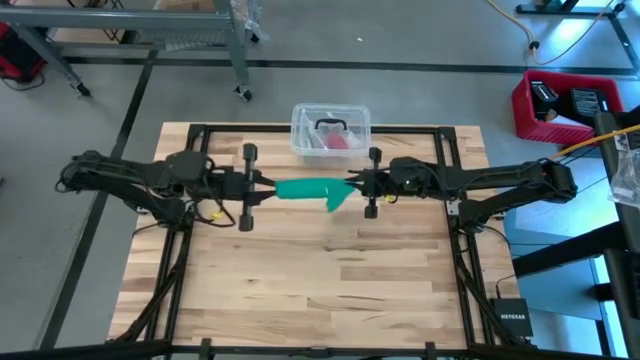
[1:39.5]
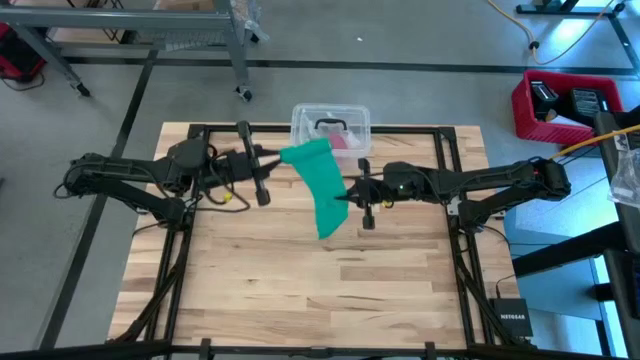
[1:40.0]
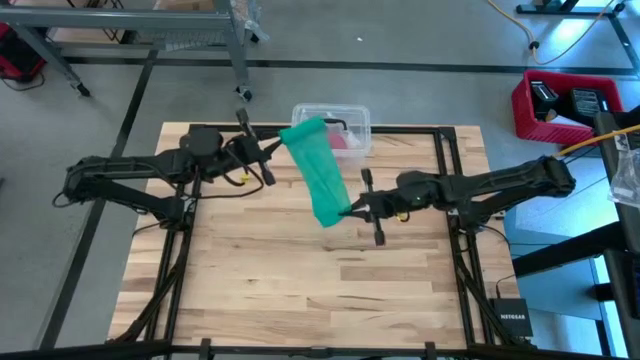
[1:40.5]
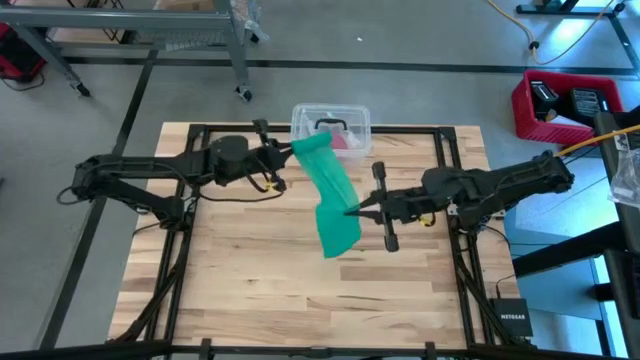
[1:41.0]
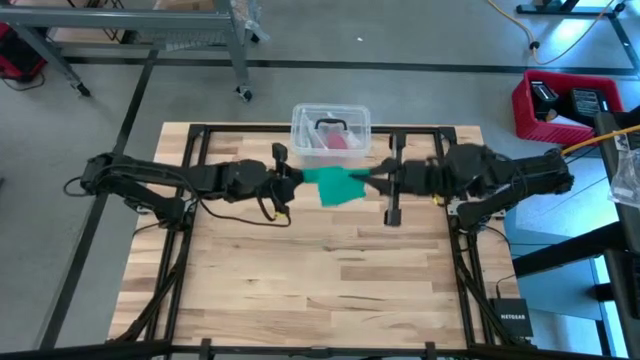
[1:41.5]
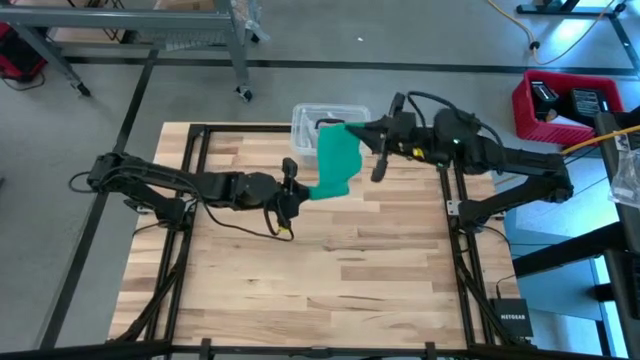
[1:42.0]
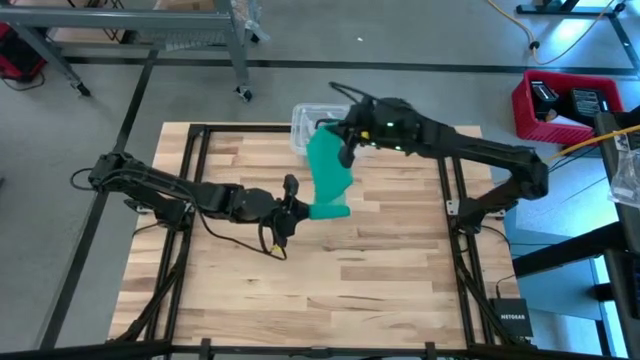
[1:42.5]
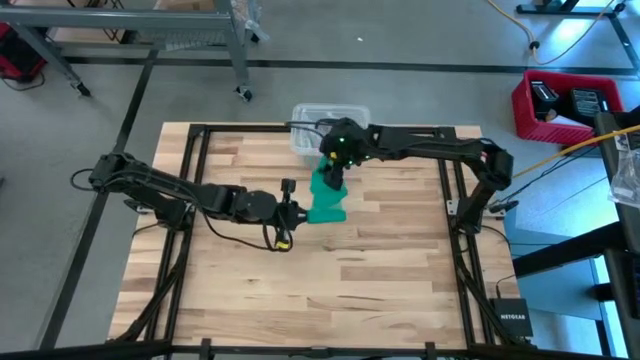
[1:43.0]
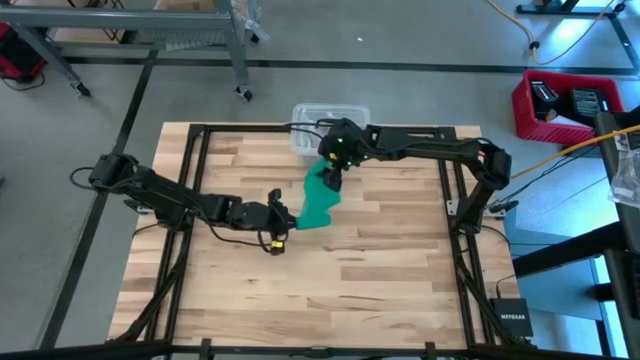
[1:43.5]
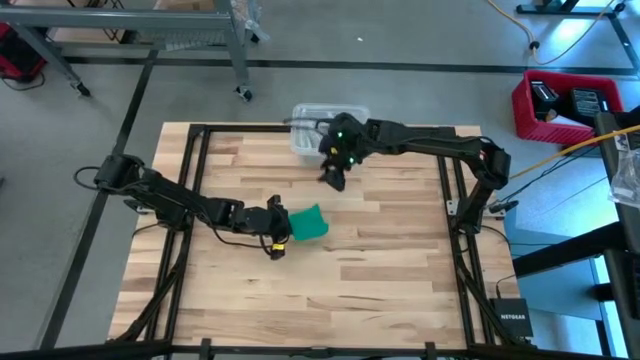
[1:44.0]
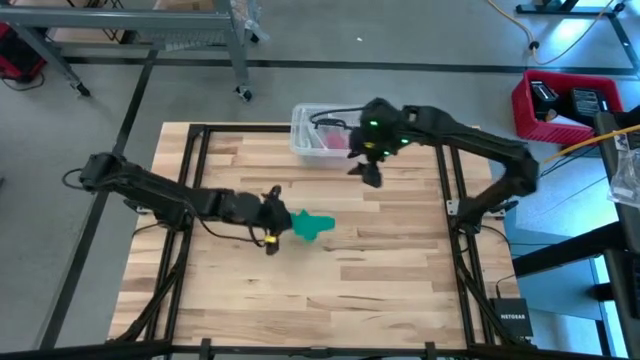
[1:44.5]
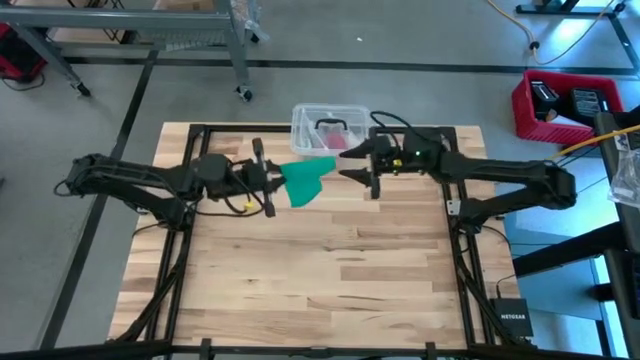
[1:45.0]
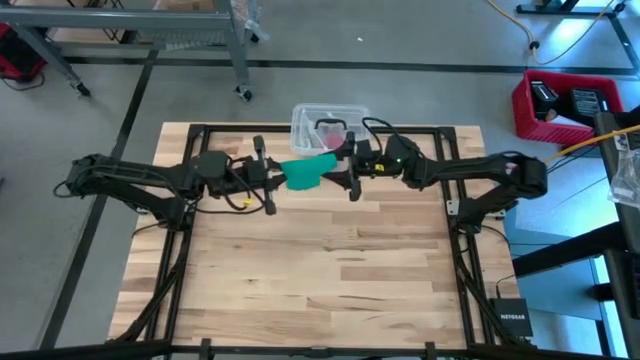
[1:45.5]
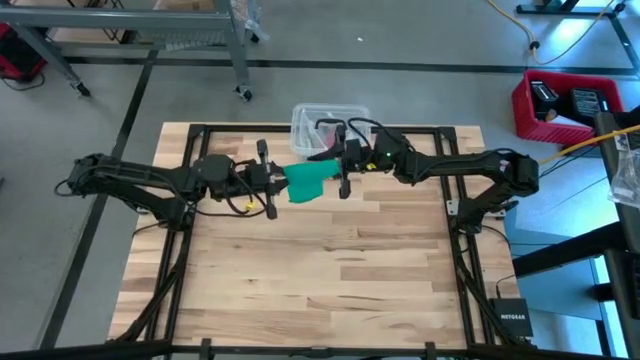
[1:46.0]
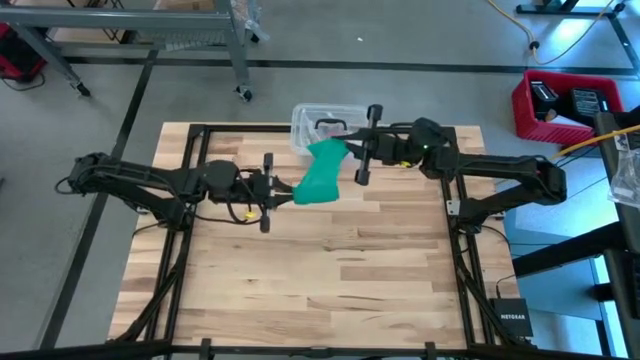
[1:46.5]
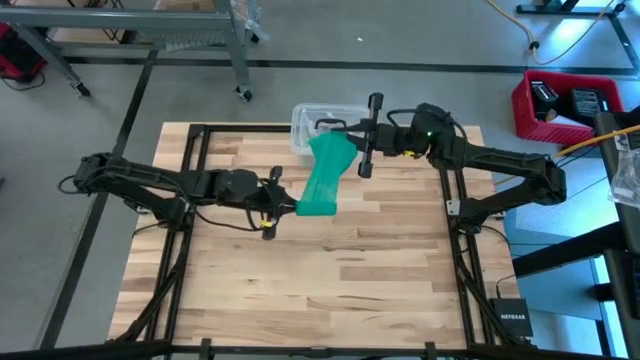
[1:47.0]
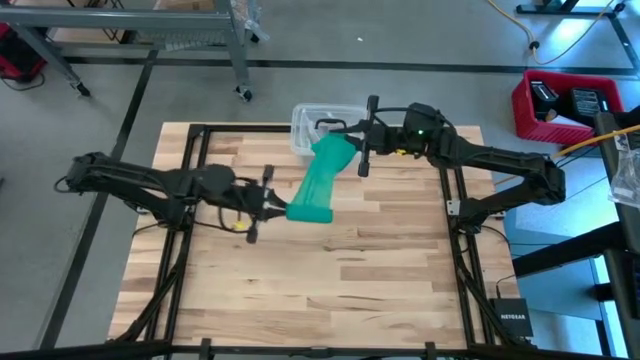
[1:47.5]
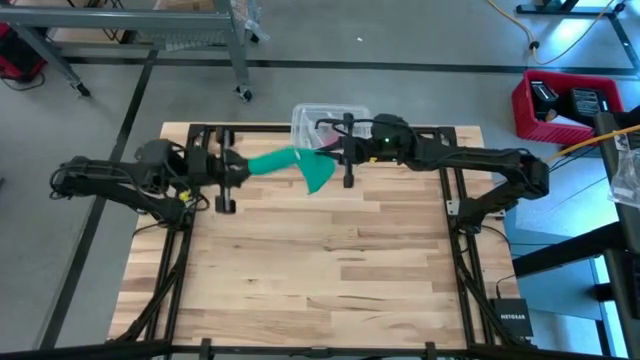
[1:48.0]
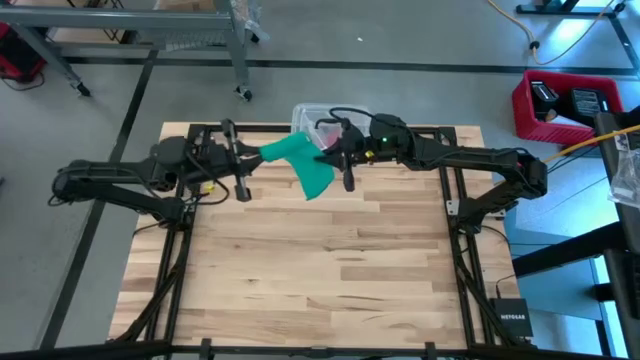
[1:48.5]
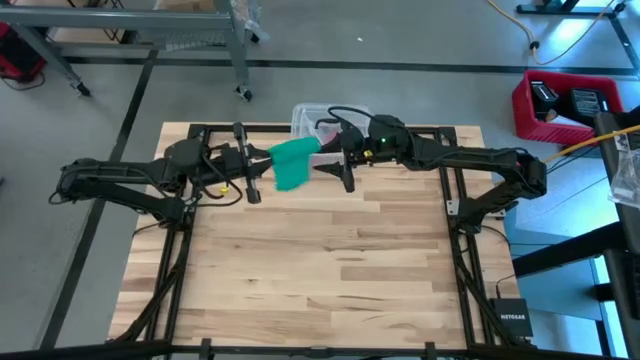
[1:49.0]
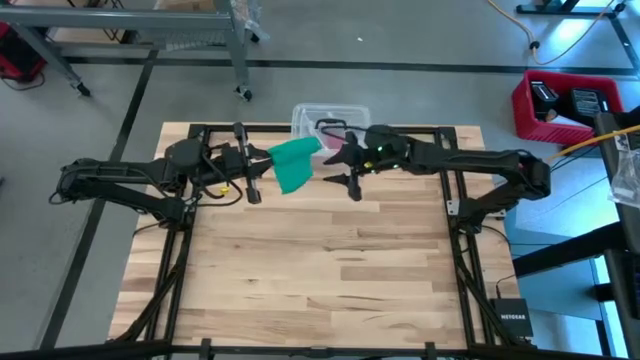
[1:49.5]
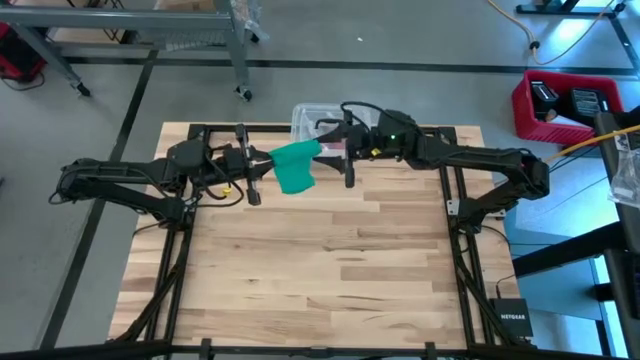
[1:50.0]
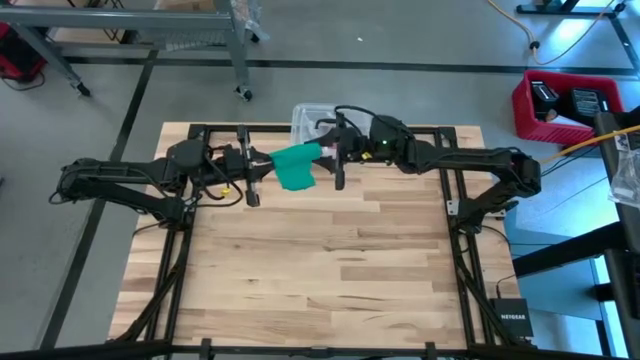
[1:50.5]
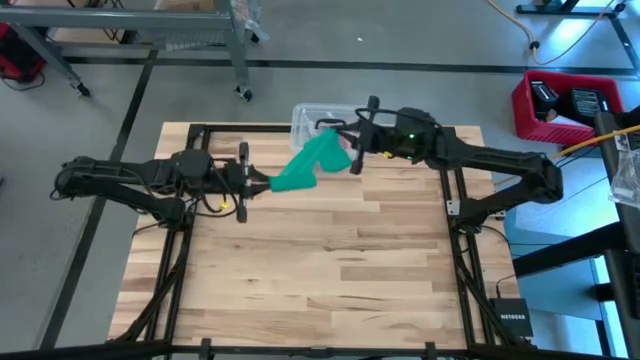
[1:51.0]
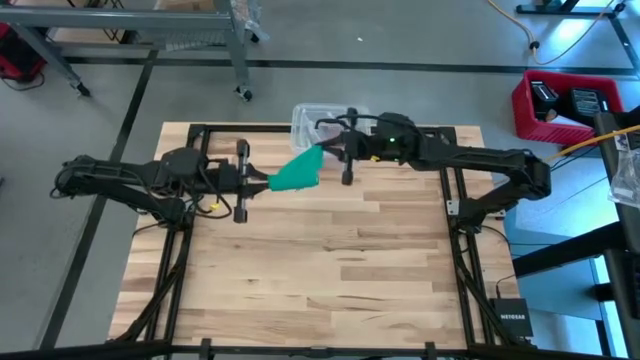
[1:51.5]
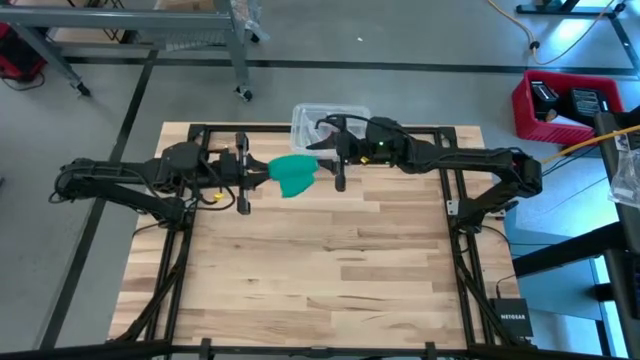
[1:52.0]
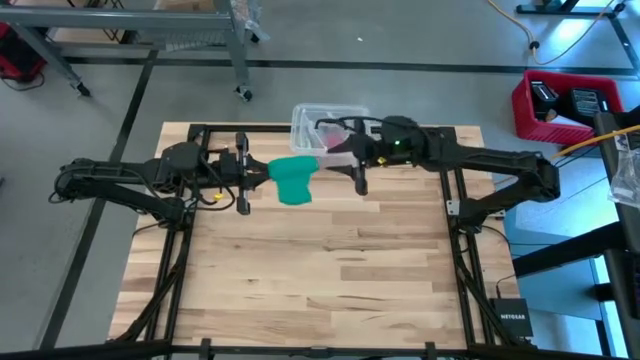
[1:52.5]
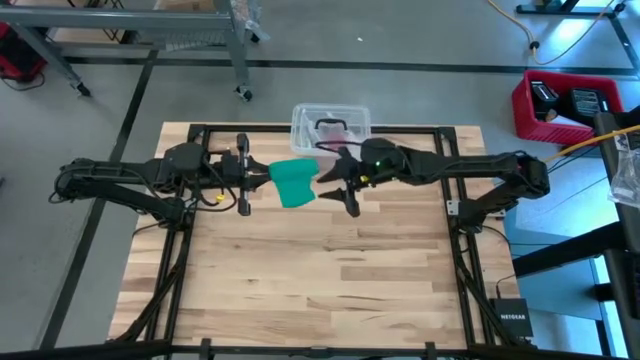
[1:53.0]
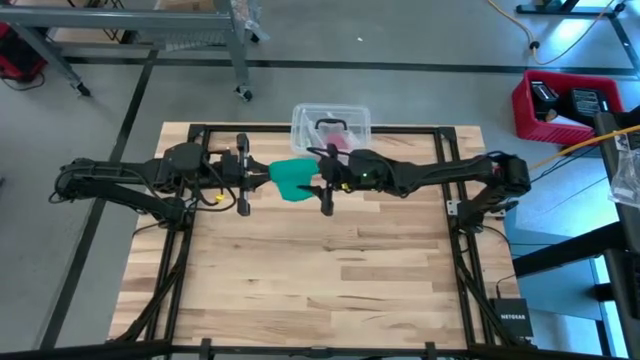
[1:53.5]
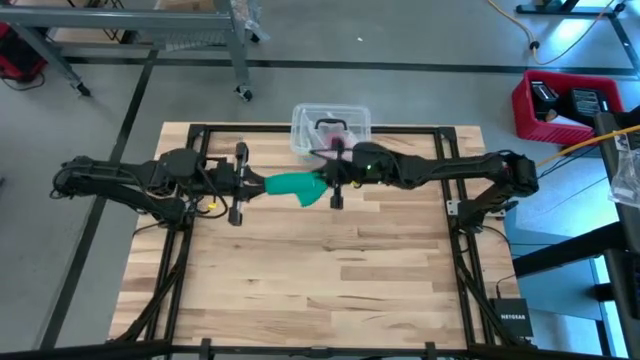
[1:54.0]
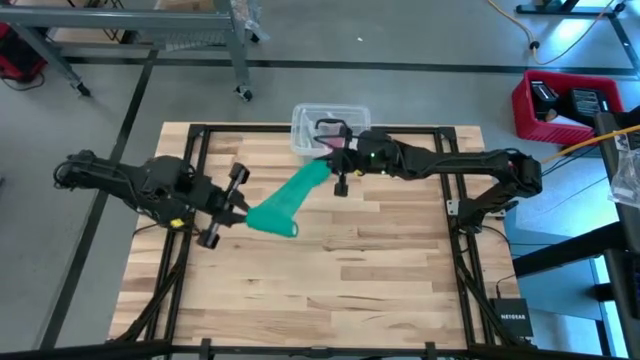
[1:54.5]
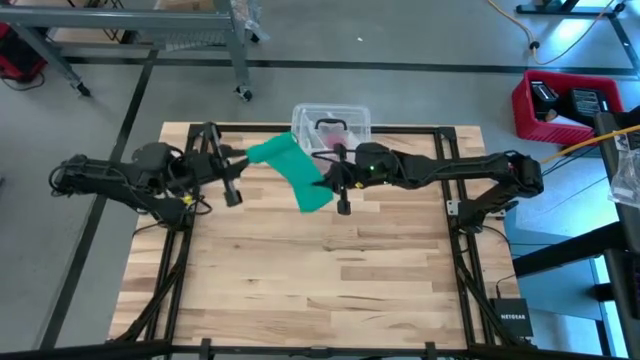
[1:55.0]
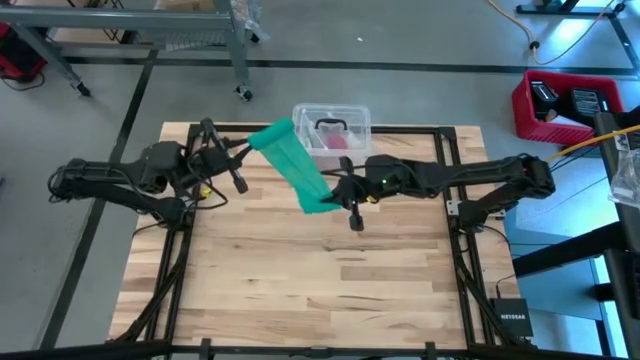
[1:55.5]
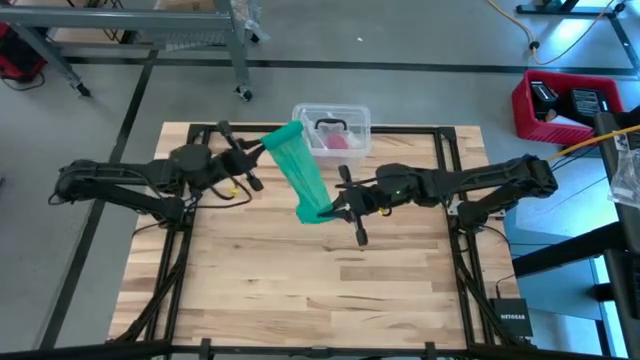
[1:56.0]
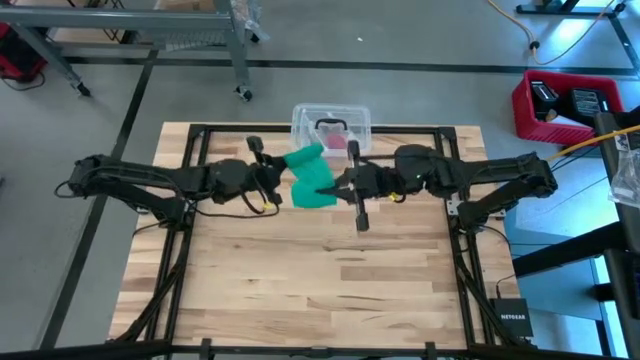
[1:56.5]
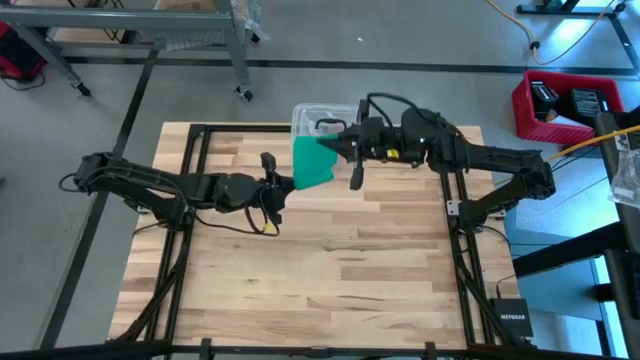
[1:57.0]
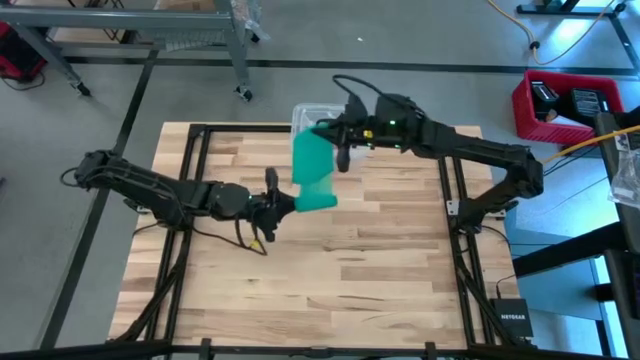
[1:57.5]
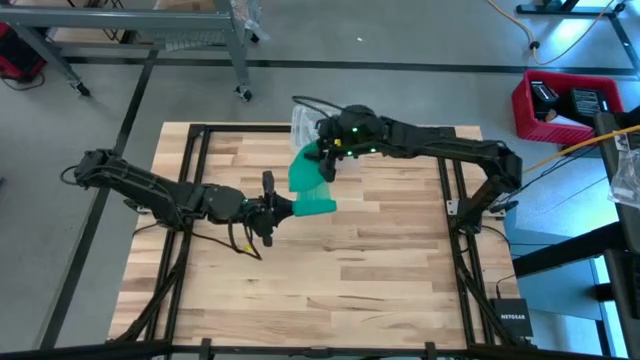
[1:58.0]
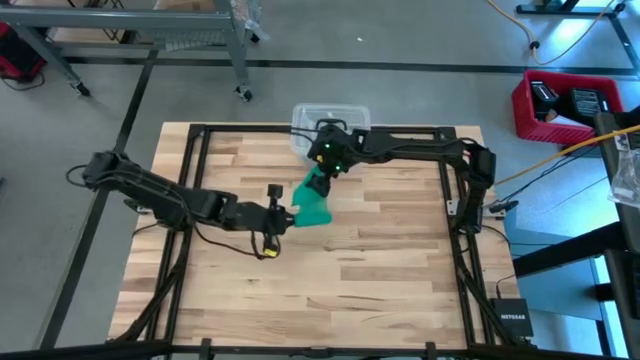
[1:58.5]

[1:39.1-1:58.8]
Task: Roll bandage
Roll the green bandage

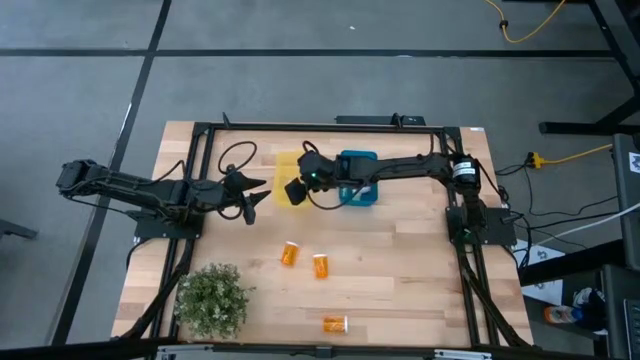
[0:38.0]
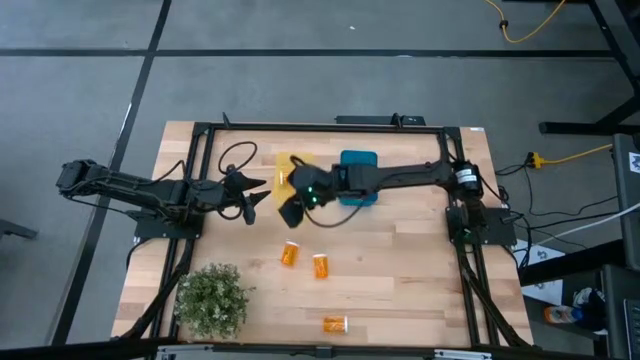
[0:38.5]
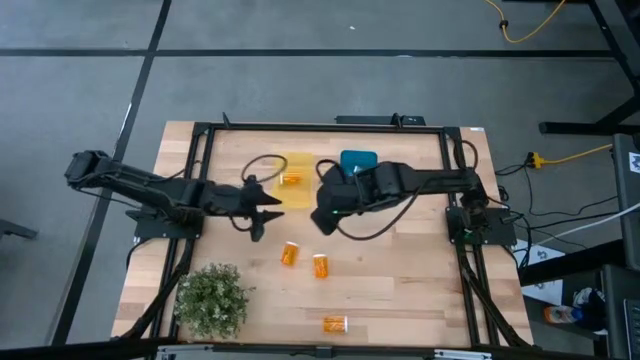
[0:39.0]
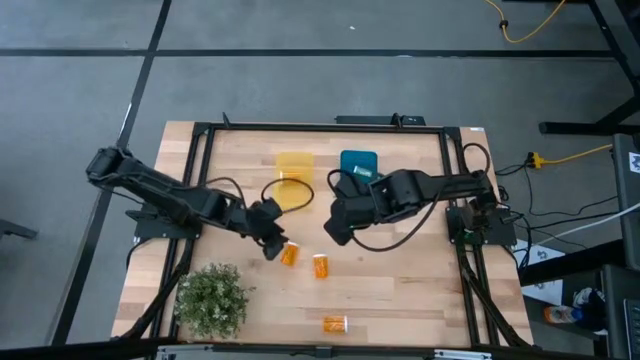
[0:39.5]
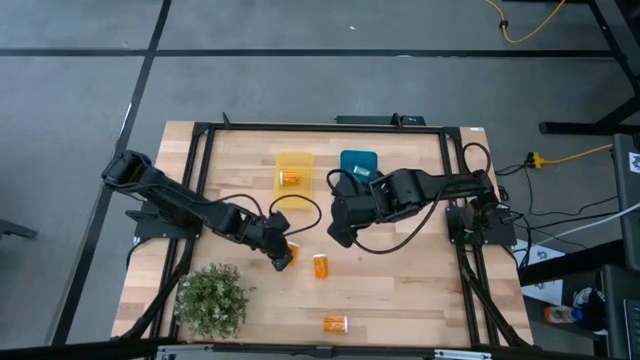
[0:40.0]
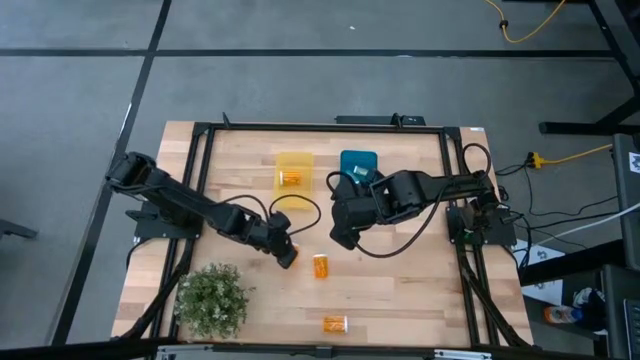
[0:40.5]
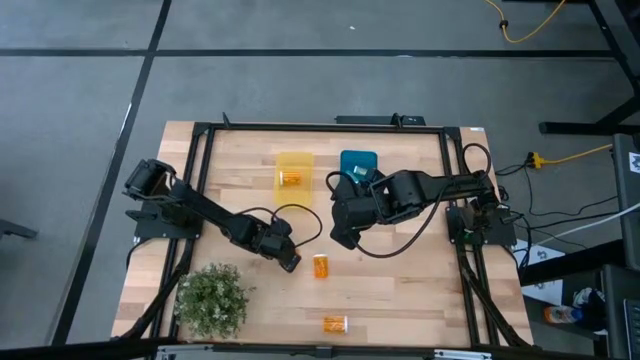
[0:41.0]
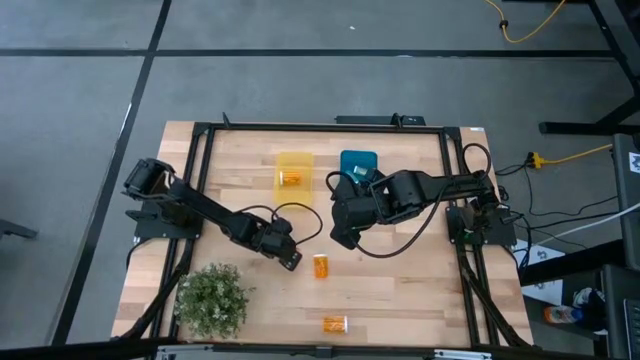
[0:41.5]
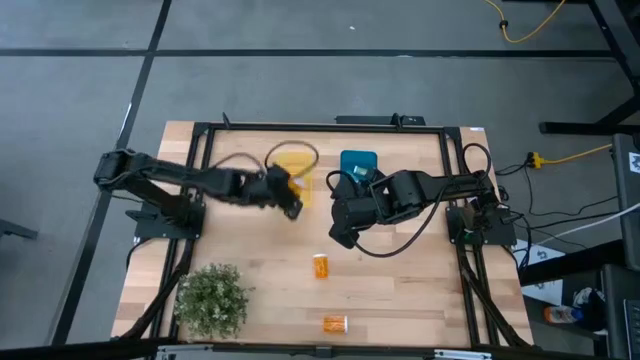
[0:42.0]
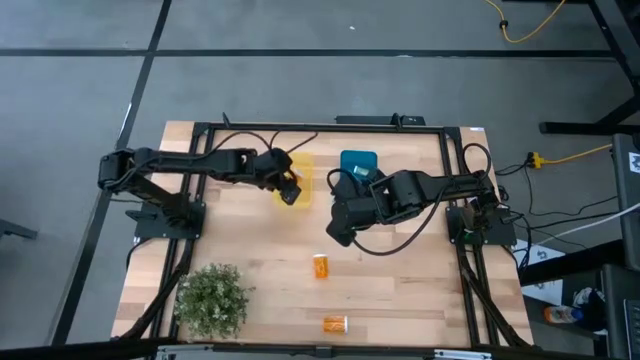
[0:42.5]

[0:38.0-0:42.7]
Task: Pick and place medicine bottles into bin by pill shape (circle, oval)
Put the orange pill bottle into the yellow bin
